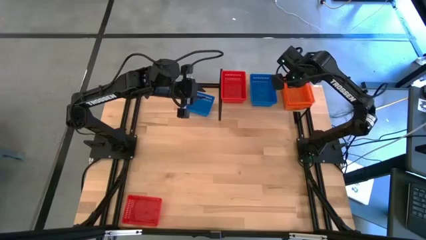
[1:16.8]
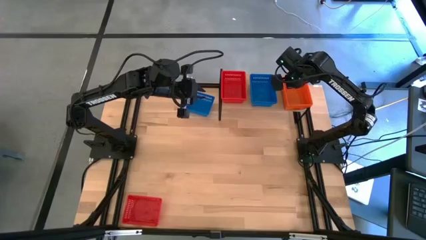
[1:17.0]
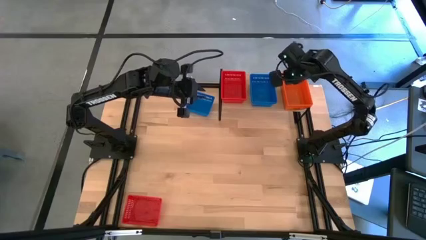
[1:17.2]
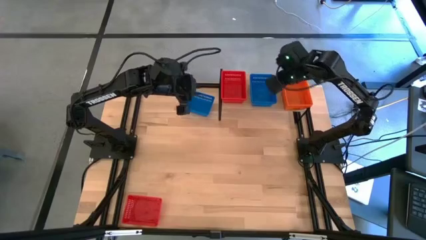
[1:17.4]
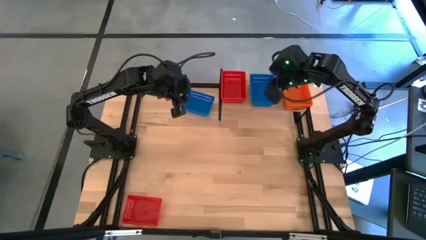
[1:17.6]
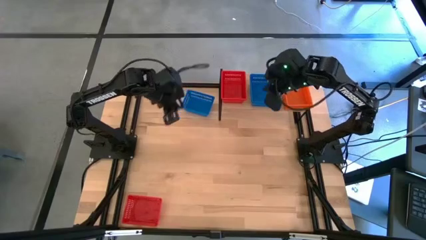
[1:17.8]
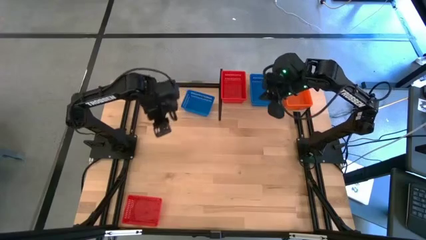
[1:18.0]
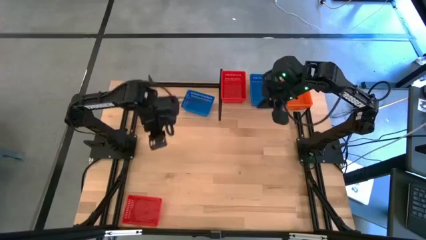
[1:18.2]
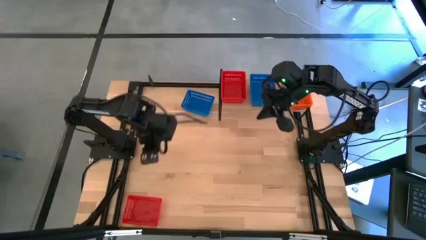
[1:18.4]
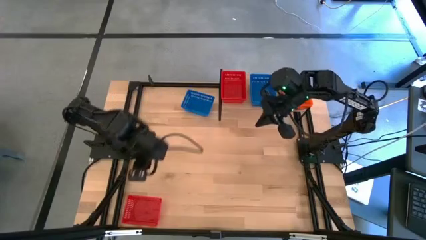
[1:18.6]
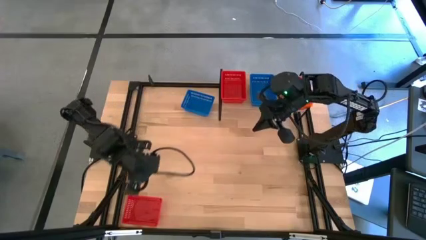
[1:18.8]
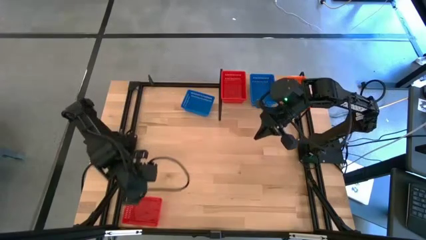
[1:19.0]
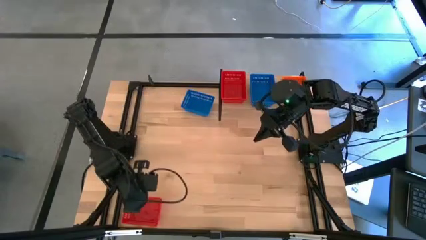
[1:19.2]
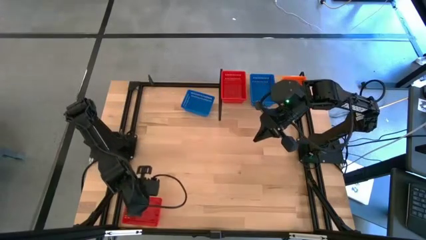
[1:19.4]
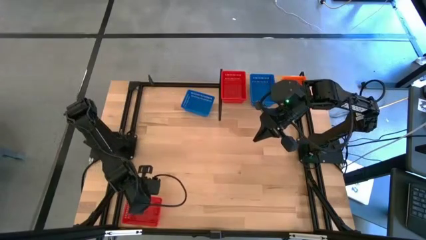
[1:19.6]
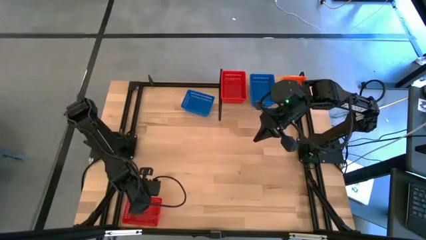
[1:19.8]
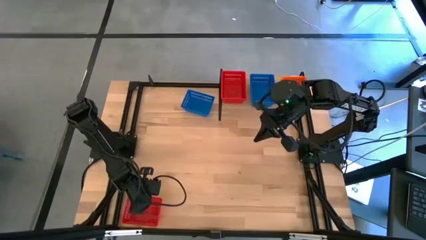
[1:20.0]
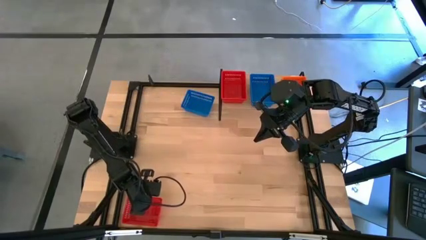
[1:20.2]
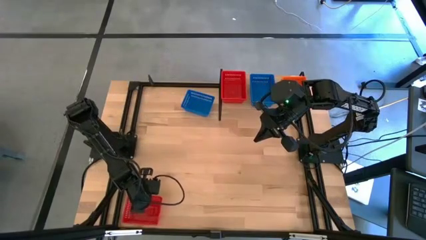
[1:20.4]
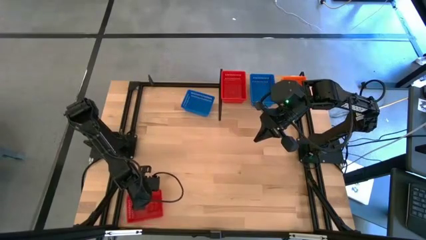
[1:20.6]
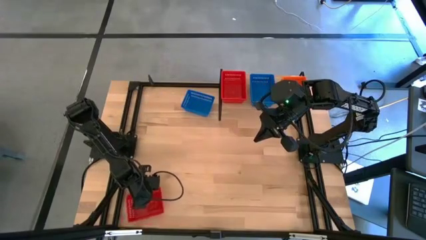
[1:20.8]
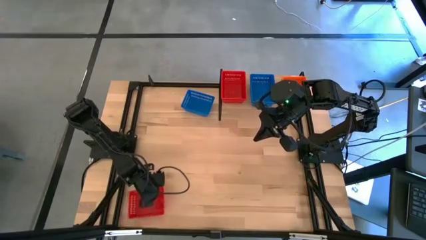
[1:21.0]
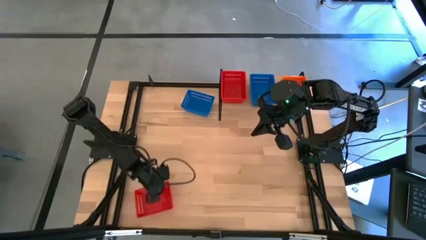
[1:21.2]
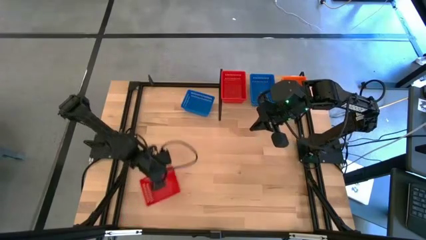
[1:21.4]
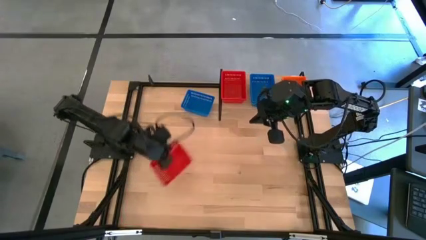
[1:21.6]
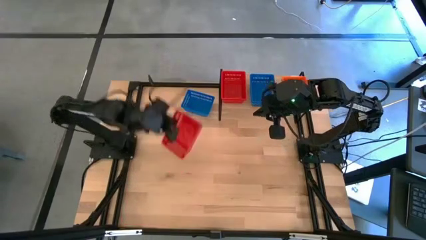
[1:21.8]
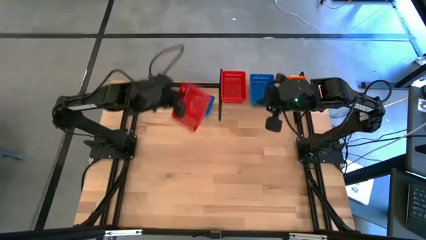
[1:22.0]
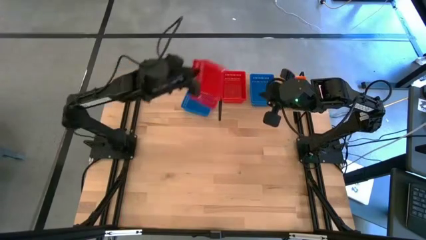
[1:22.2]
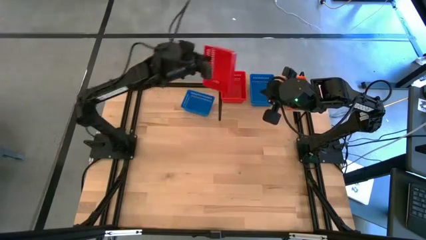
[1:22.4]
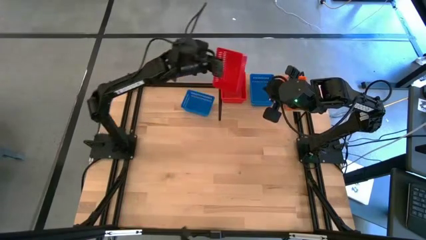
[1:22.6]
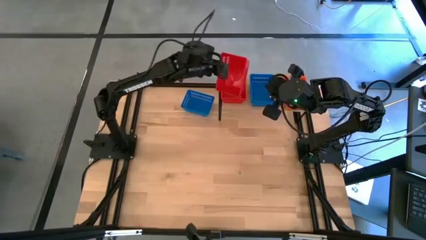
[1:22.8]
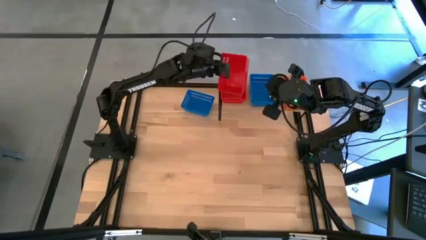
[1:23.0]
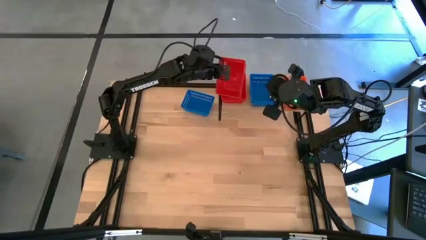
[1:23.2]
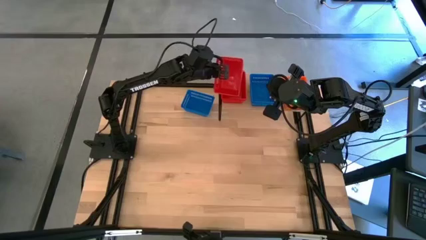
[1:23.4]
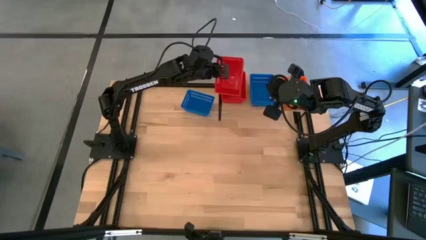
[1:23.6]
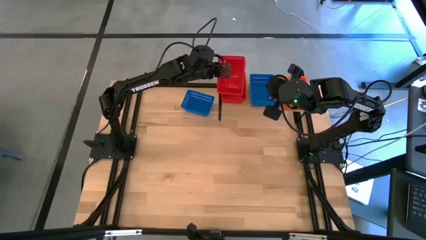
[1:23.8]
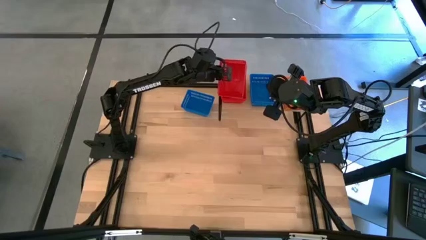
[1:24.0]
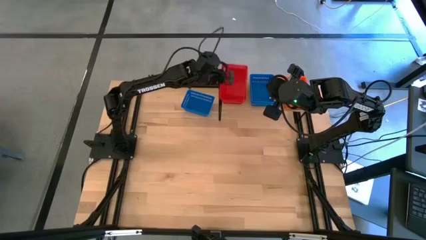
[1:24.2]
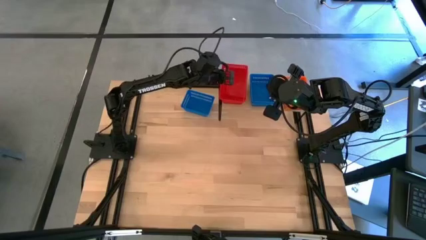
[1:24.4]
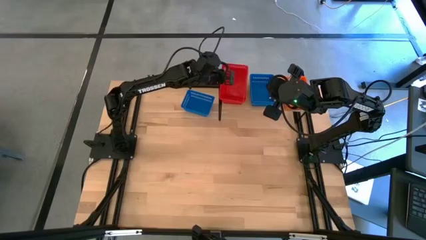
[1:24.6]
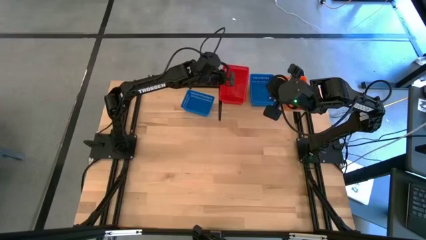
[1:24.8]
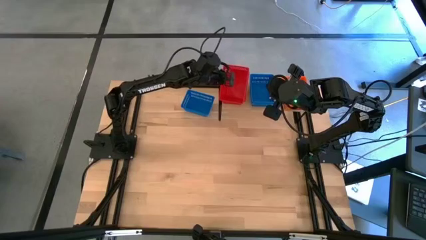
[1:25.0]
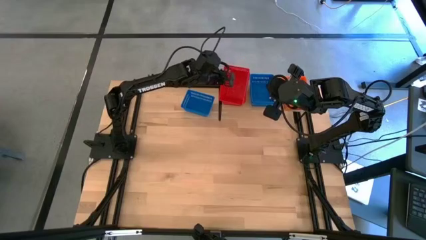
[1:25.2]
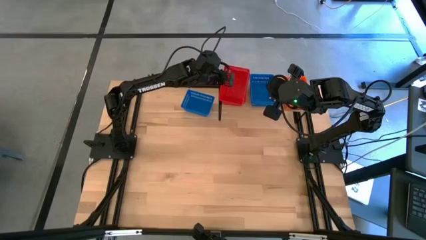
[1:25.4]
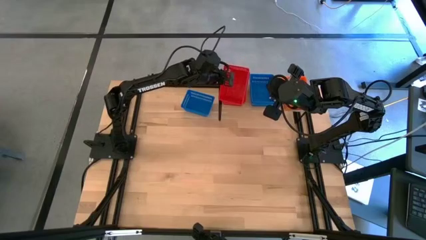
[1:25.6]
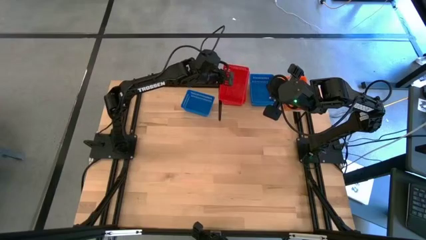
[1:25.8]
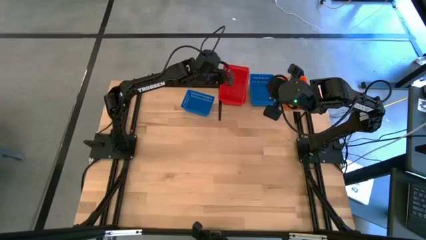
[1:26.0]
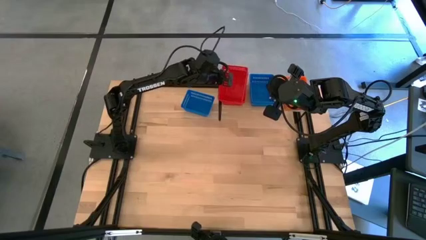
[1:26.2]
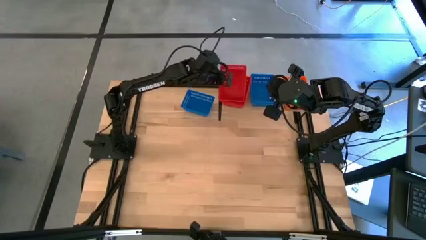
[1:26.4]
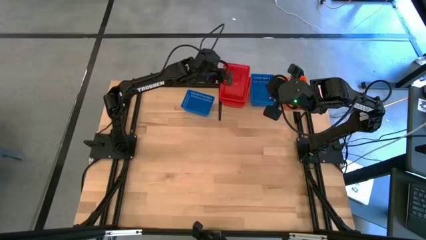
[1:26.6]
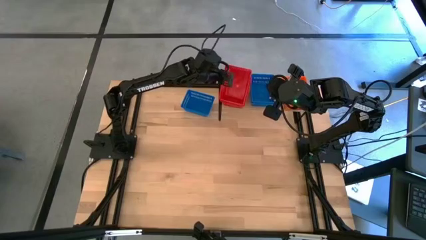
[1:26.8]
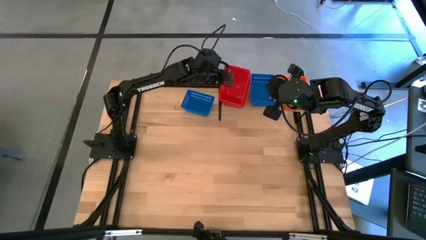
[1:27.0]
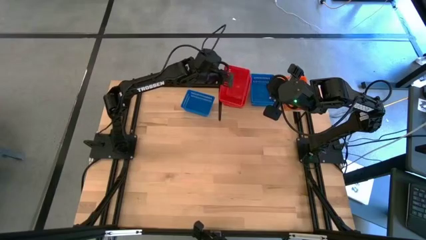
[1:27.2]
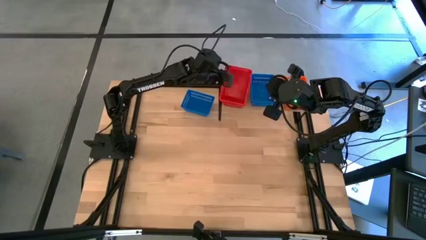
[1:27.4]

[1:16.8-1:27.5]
Task: Stack baskets on shelf by color
Stack the red bin on top of the stacked red bins on the shelf

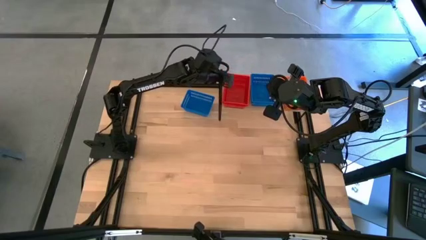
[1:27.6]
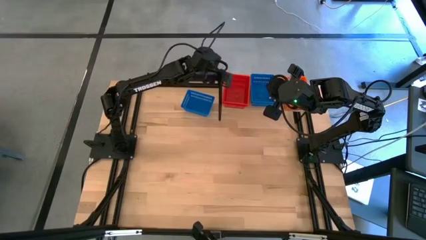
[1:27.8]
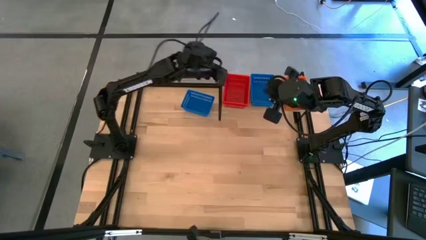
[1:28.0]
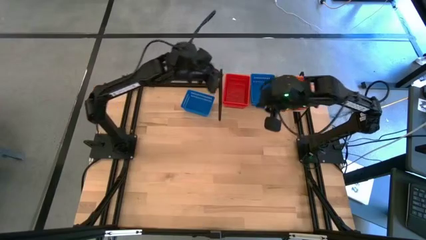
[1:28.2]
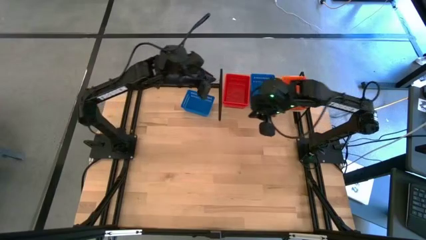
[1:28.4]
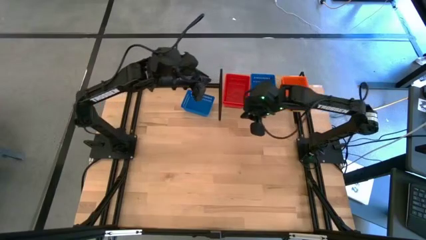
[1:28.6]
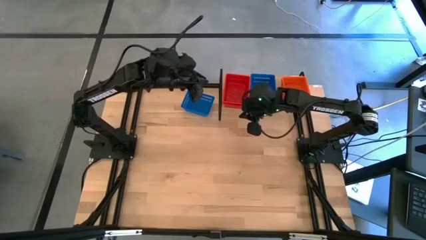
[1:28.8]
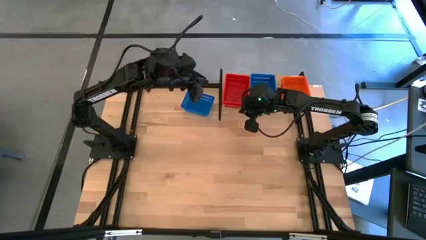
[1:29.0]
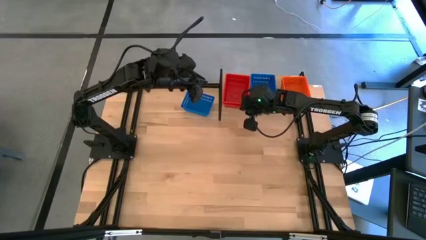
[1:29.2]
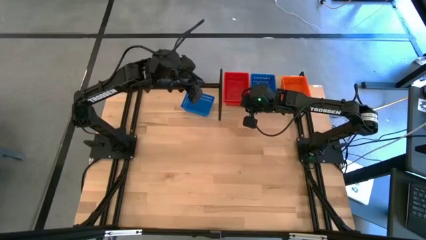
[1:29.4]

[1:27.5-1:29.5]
Adjust the stacked red bins on the shelf

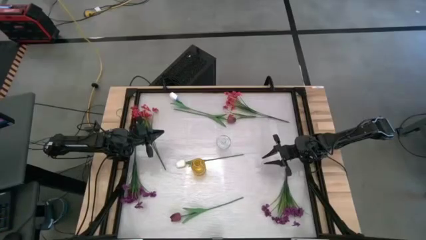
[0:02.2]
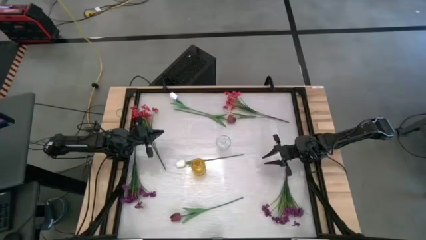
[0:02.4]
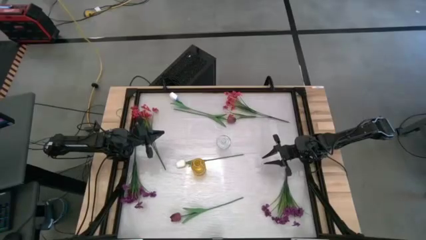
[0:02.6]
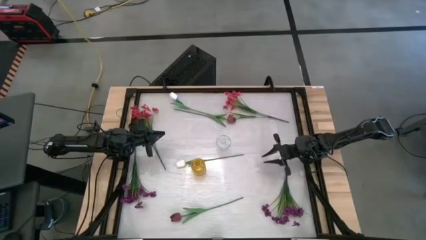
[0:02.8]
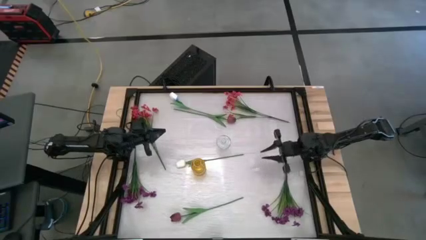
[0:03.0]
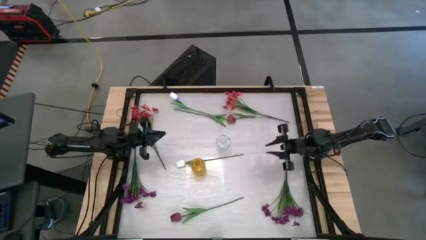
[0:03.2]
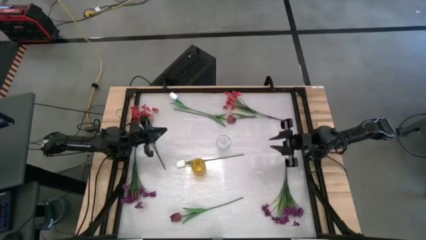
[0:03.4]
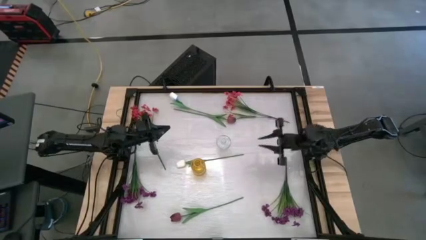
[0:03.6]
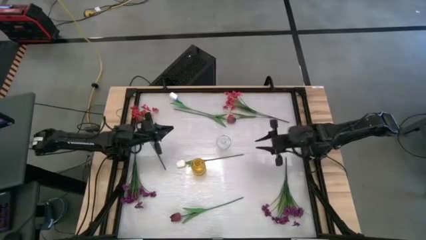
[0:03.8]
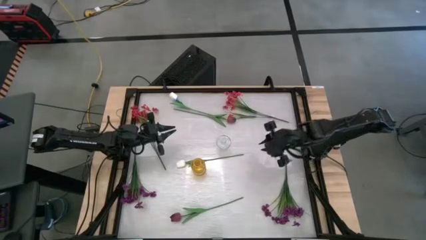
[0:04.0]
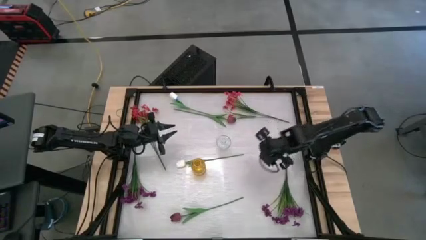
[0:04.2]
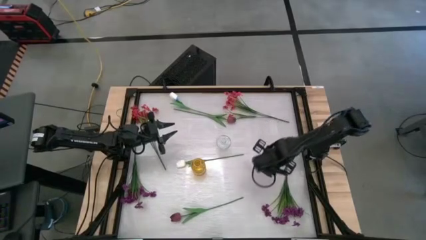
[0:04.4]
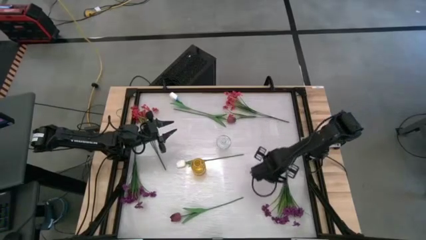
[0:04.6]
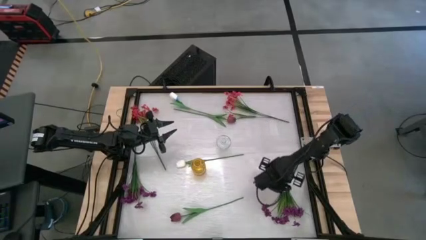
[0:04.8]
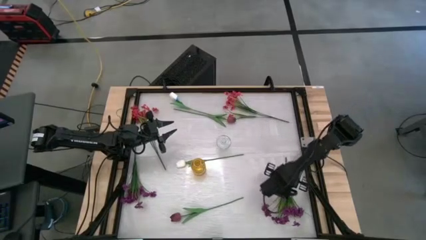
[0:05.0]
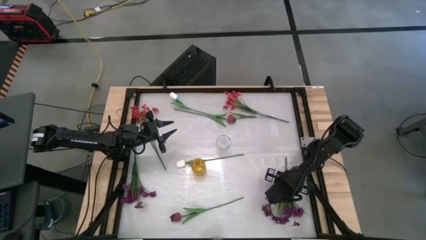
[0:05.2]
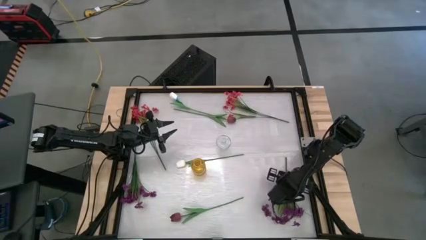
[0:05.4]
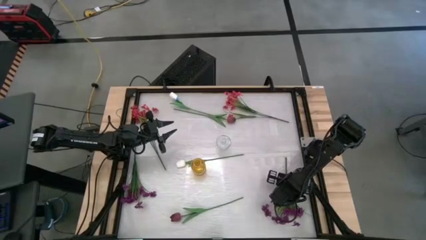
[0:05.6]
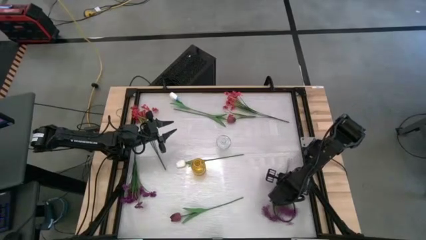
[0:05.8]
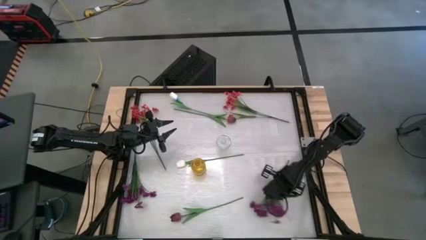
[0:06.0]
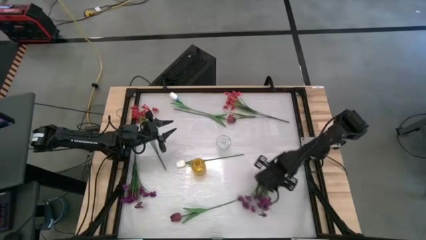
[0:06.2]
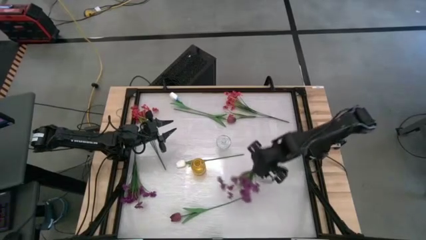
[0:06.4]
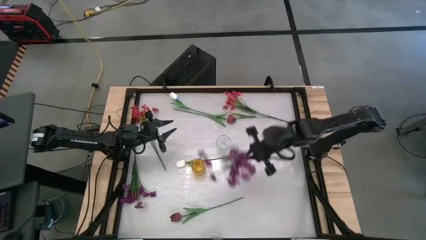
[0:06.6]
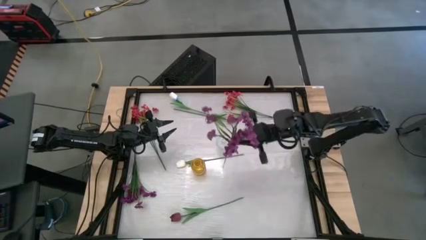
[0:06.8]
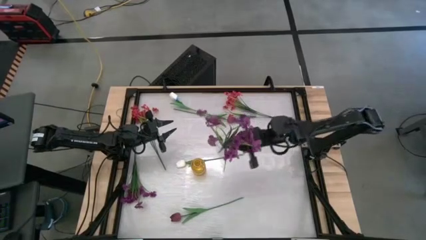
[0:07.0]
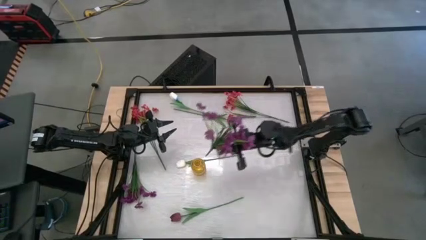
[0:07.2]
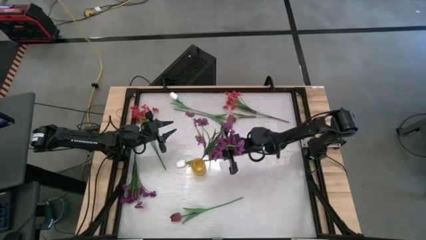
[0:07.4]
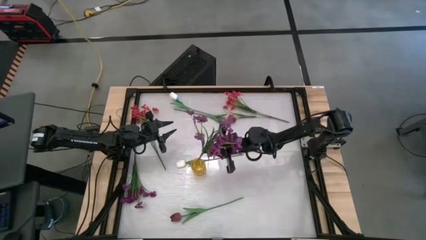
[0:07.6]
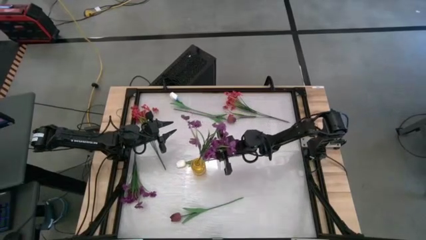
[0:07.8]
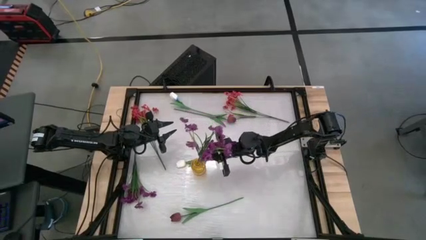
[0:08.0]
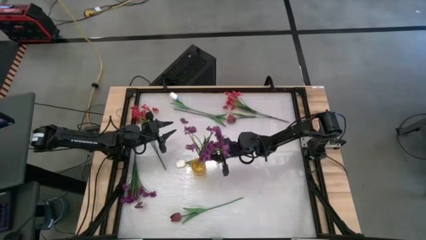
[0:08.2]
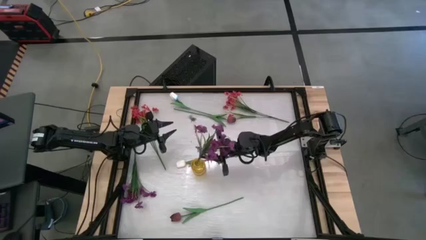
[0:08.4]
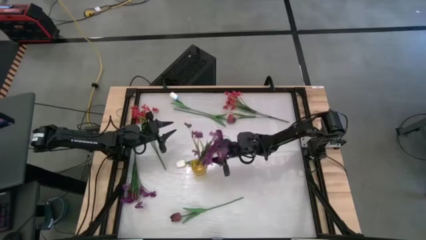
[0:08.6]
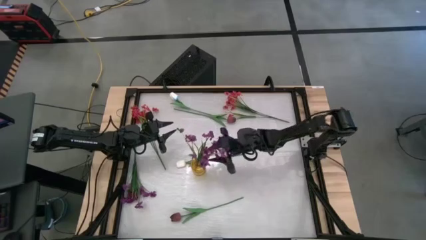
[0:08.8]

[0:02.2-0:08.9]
Task: Sort flowers into vase by color
Put the right purple flowers into the yellow vase
